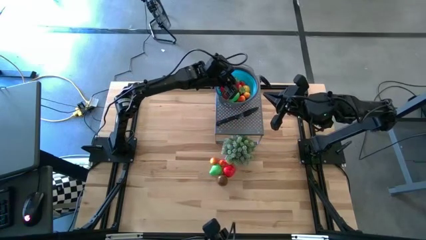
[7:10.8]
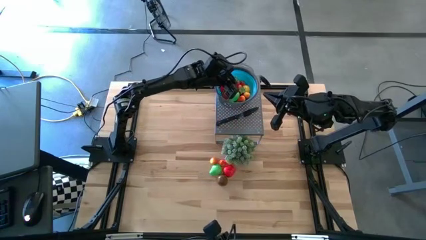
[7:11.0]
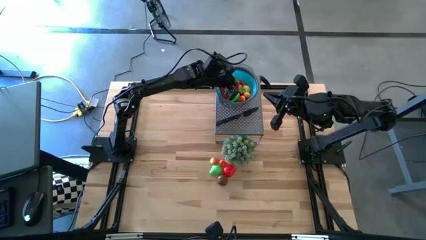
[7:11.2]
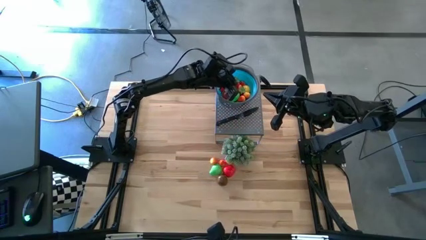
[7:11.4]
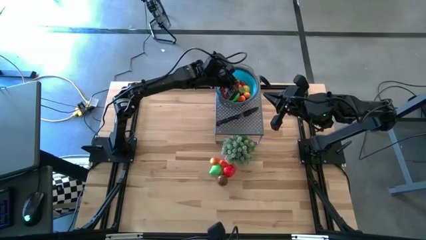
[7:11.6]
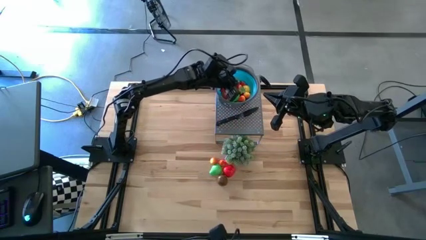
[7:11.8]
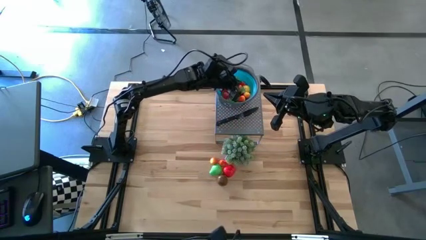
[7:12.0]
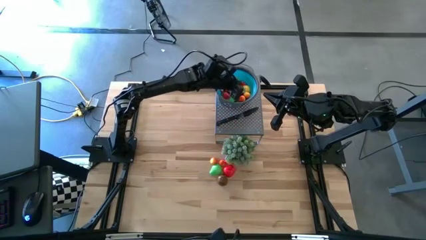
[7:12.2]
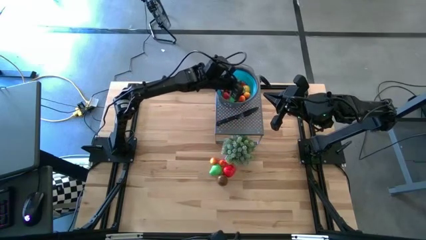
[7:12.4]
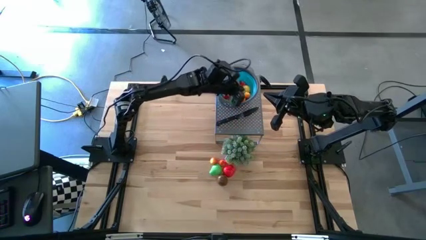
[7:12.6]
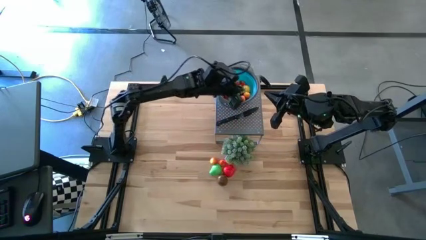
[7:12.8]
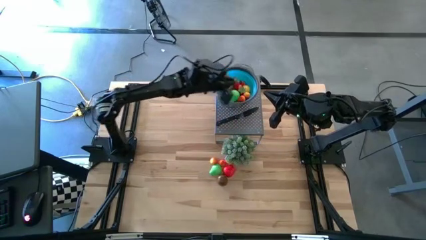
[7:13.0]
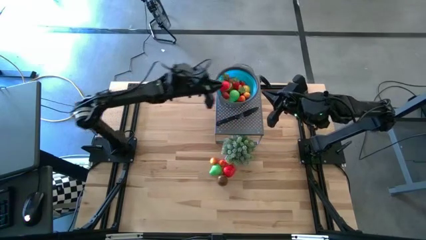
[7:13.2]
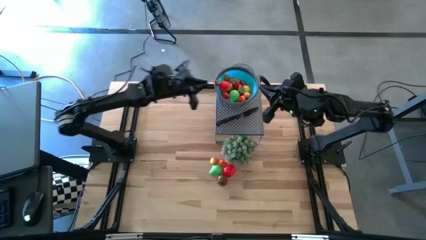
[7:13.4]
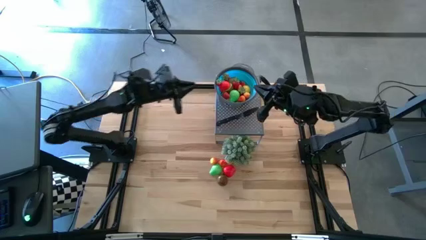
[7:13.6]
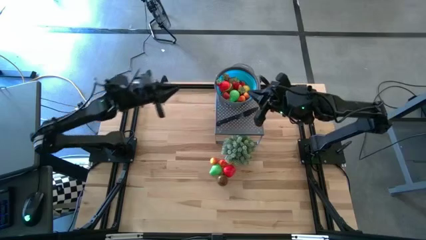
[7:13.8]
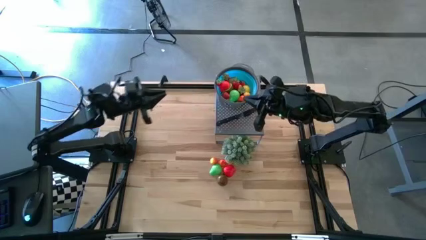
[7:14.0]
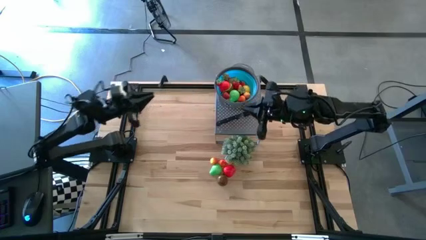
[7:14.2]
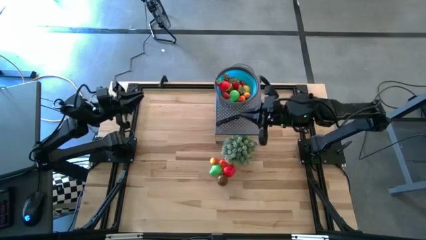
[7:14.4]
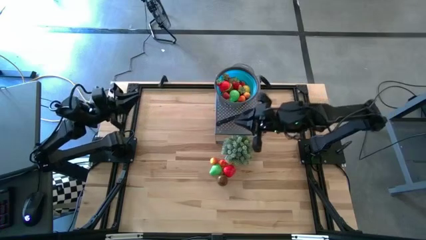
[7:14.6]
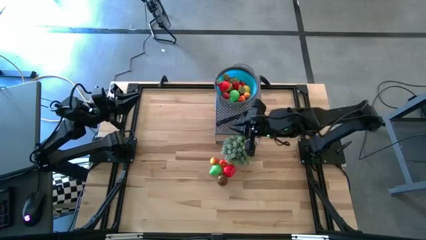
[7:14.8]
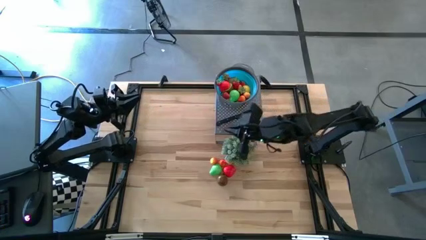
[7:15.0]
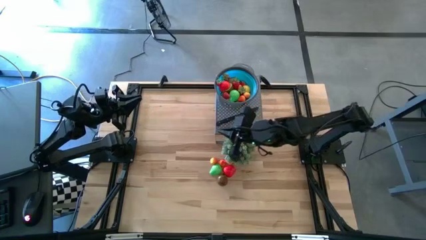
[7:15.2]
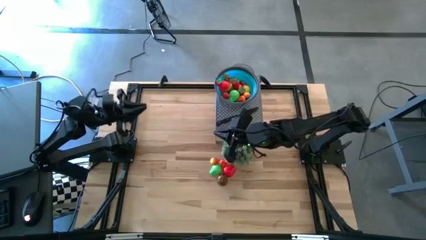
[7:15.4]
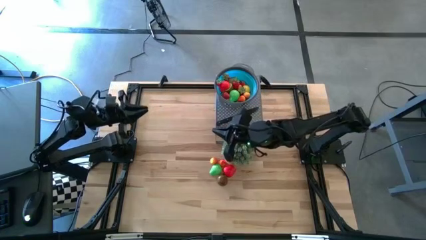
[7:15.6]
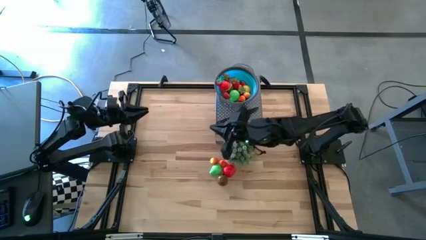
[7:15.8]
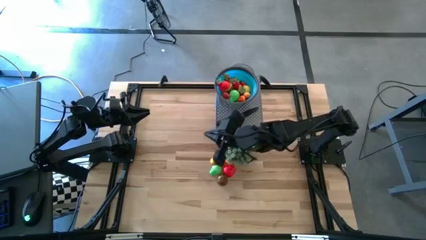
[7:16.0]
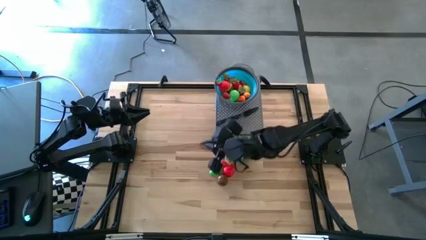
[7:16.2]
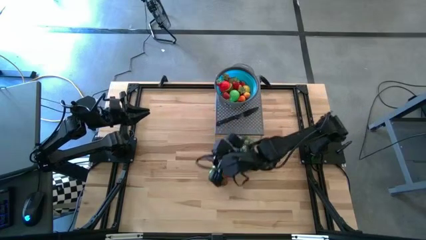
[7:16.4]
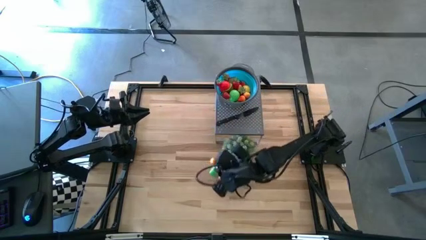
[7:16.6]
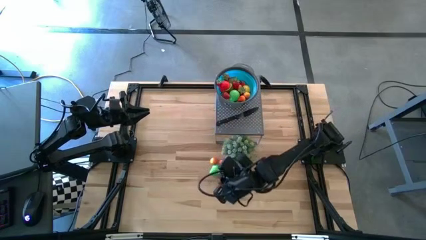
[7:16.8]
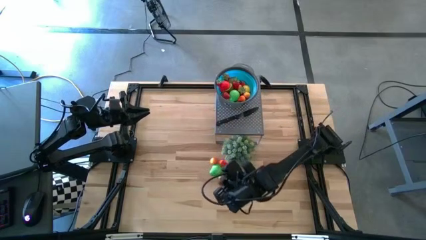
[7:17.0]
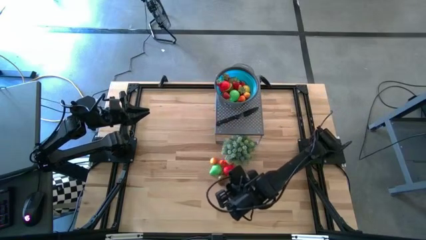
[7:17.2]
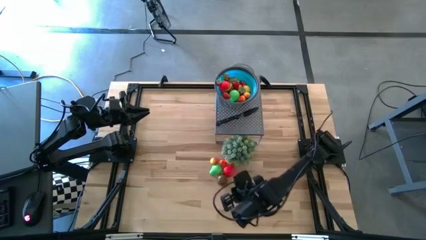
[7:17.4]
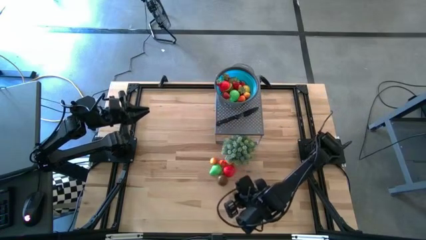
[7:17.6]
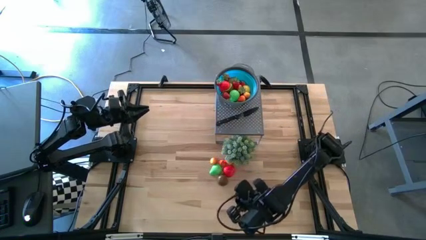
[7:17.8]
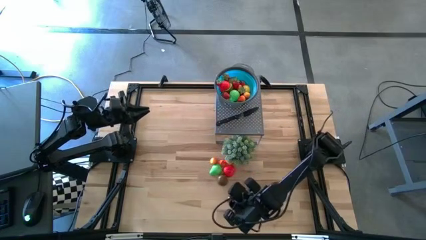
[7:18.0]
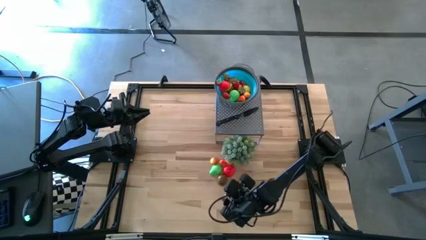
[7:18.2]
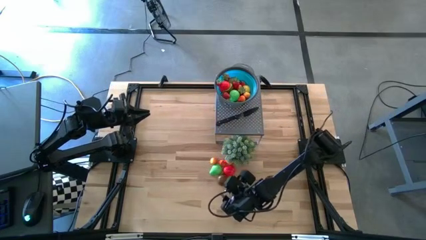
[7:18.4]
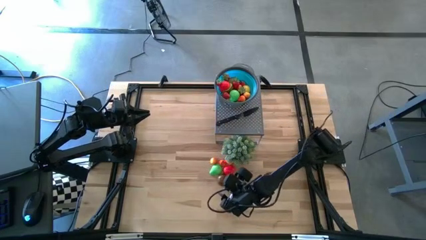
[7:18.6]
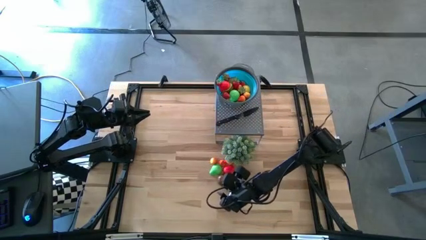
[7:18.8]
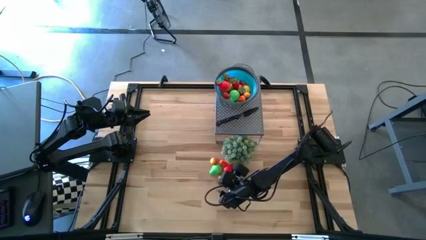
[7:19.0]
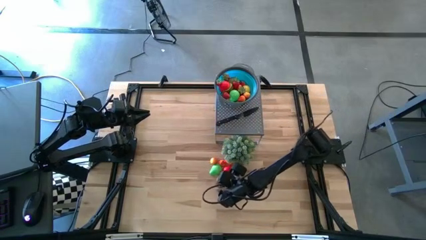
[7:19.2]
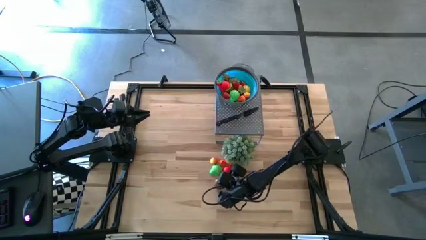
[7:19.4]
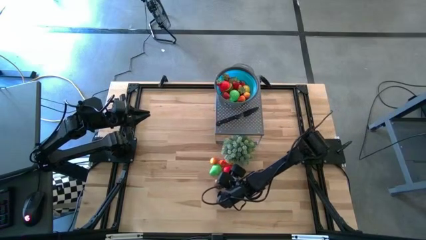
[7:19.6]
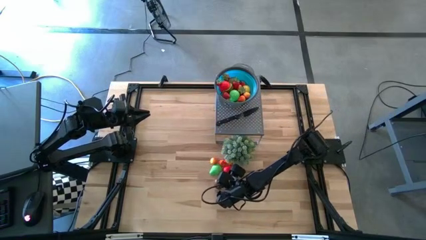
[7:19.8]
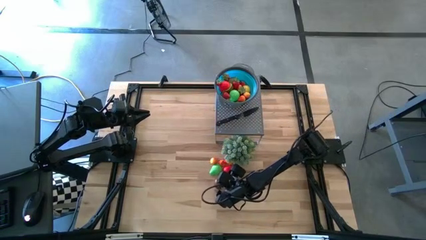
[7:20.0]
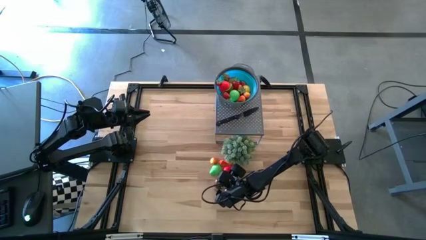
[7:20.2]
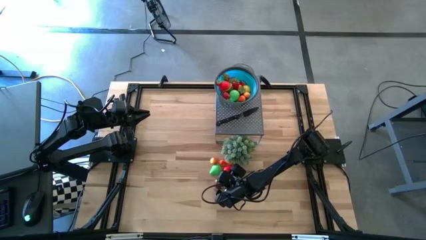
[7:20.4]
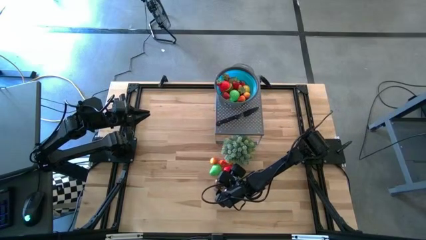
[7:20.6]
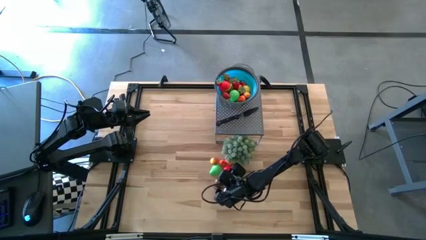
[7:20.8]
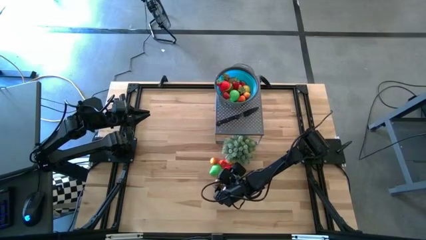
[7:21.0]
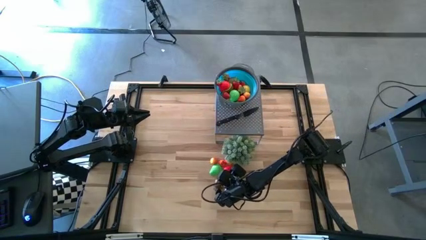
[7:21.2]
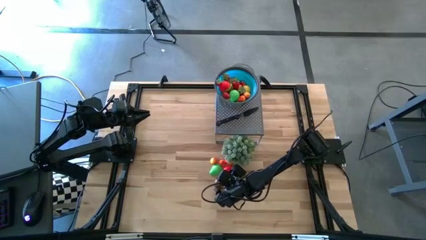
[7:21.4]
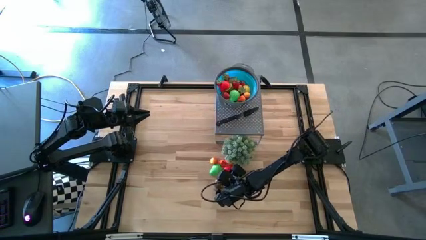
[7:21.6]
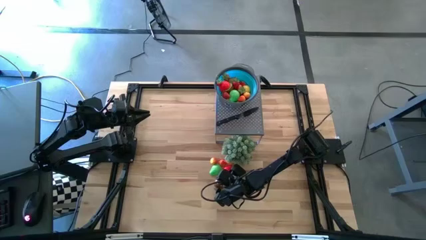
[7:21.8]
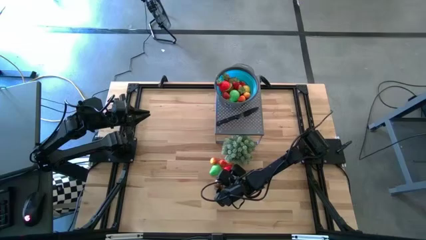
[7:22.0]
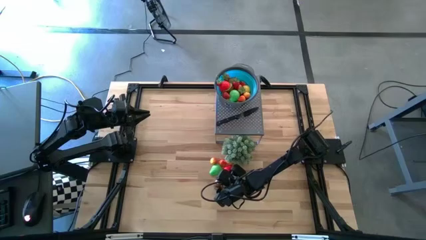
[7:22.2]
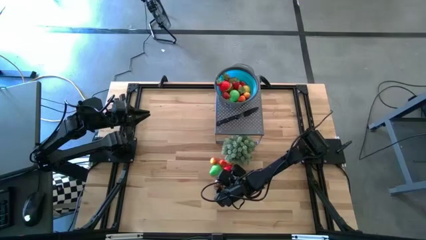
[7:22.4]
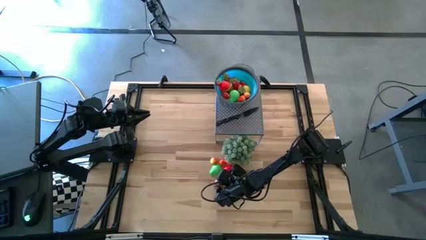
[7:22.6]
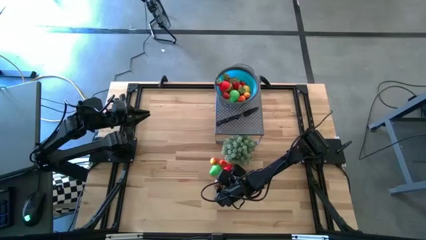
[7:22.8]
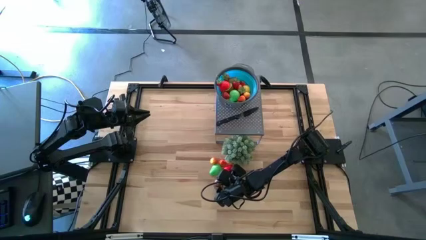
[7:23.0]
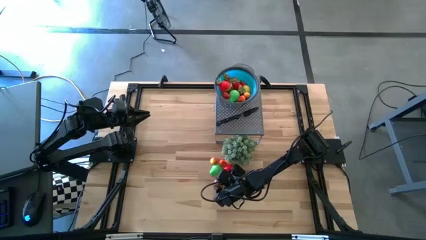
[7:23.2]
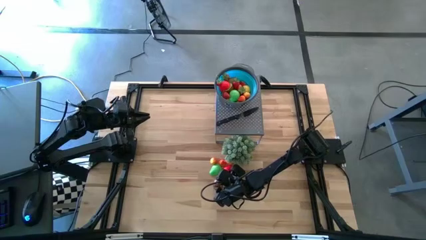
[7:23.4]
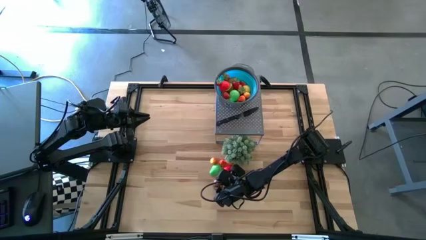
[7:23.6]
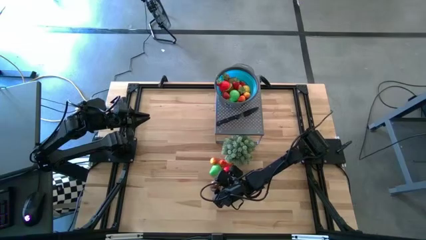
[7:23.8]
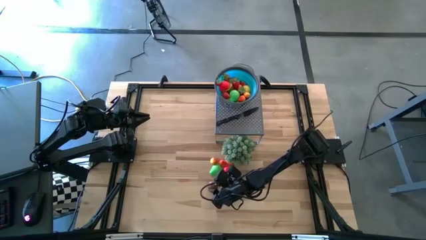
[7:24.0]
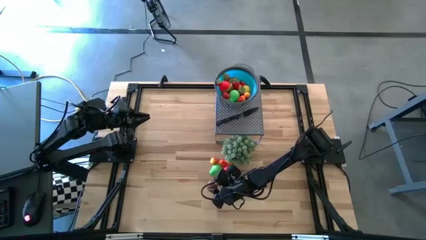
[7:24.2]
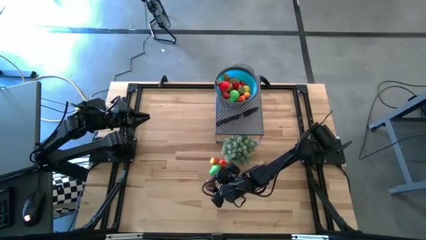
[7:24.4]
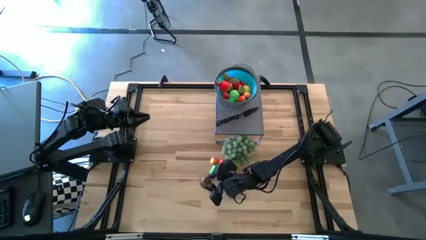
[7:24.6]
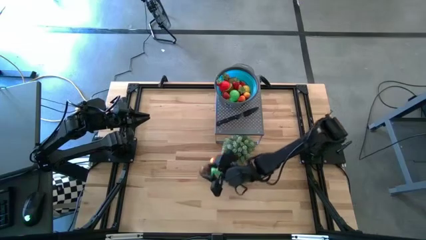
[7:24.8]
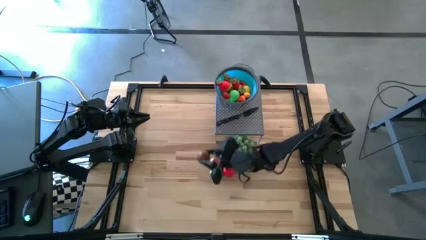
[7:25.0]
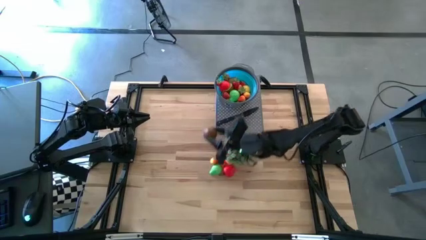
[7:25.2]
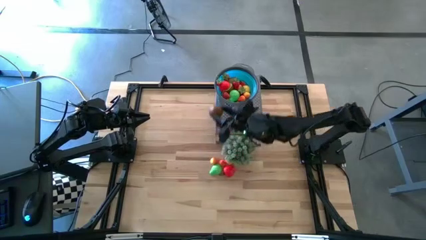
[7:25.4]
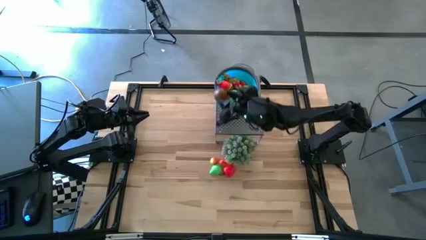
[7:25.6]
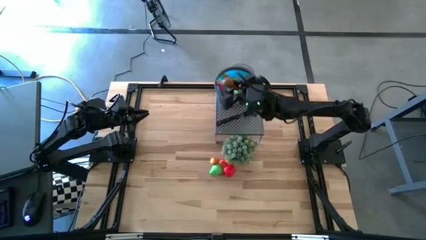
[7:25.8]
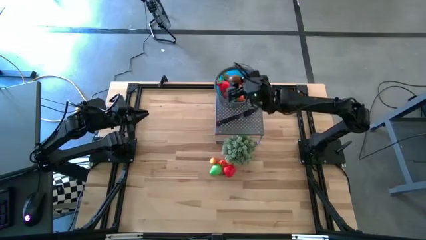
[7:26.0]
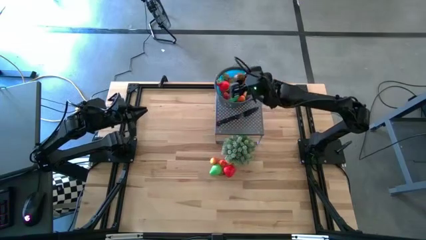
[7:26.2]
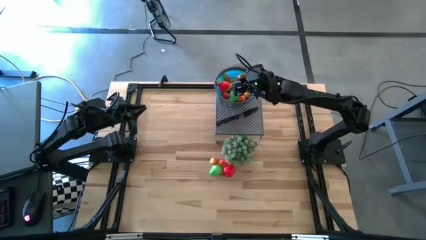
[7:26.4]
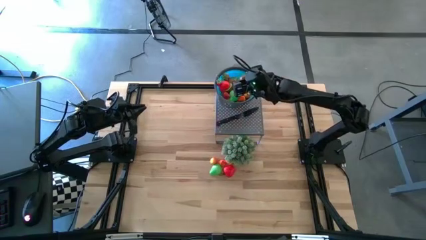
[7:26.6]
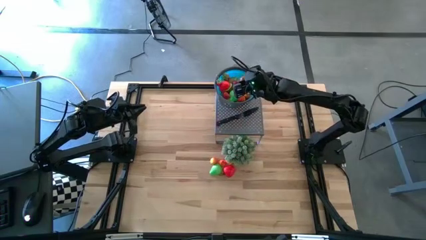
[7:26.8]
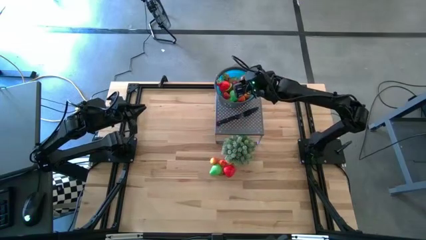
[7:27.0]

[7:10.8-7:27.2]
Task: Pick & Place Fruit
Put the brown kiwi into the blue strainer bowl

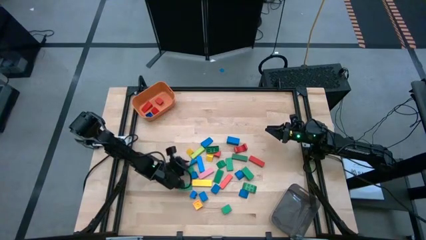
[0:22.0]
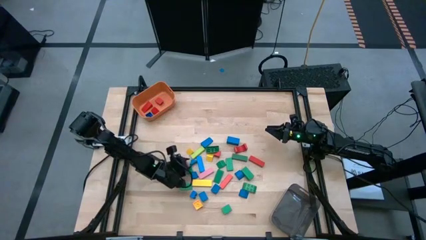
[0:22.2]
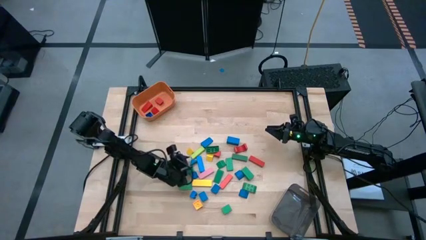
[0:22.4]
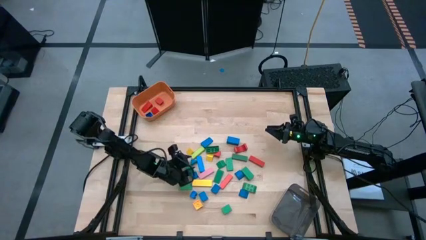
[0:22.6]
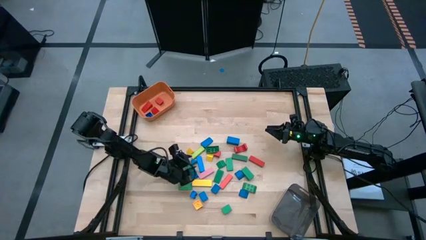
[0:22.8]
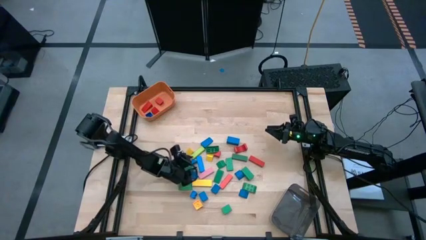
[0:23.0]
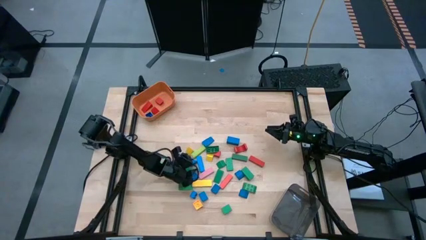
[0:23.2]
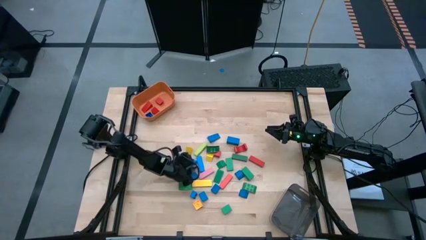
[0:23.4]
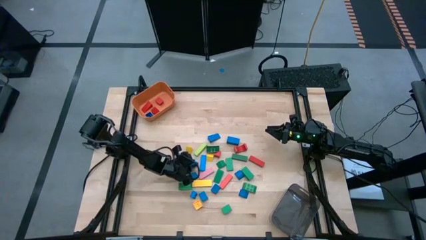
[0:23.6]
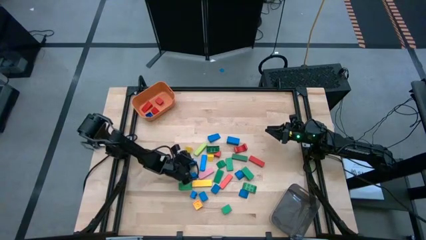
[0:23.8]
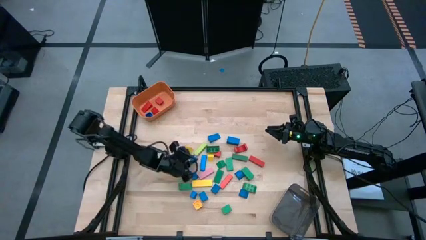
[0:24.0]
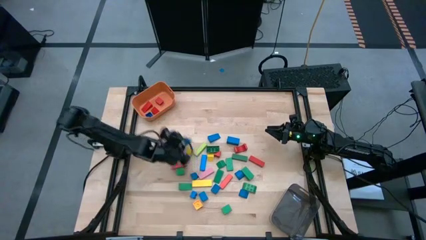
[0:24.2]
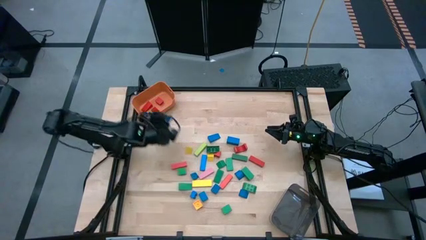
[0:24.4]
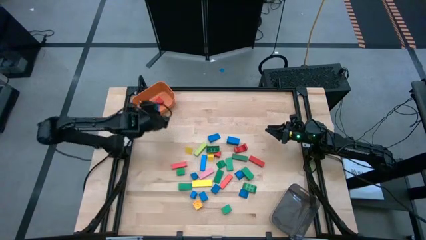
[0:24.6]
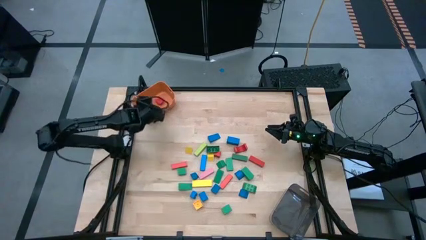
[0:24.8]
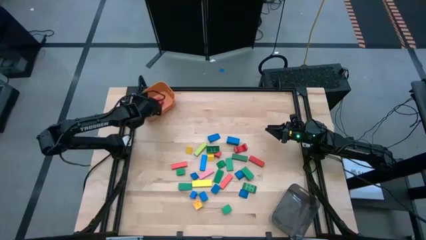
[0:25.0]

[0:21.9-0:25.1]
Task: Sort blocks by size
Put the small blue block into the orange bin
